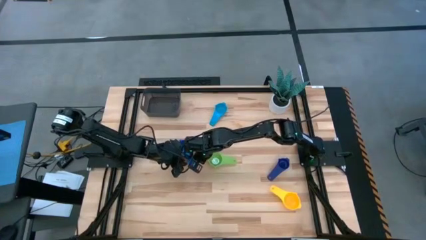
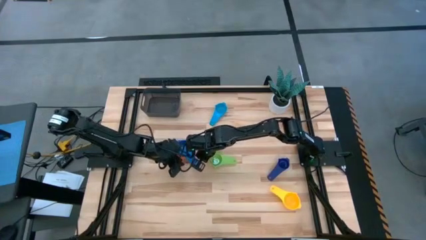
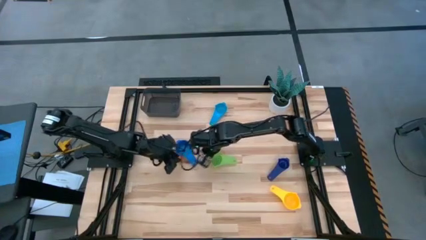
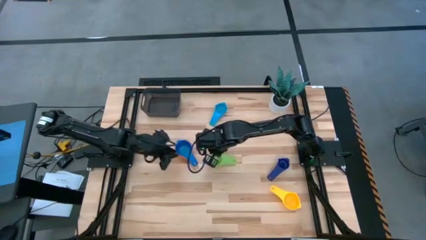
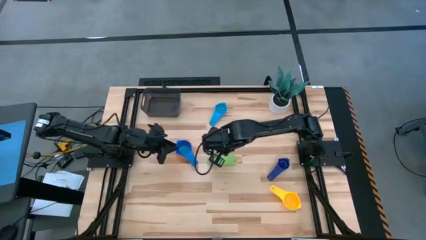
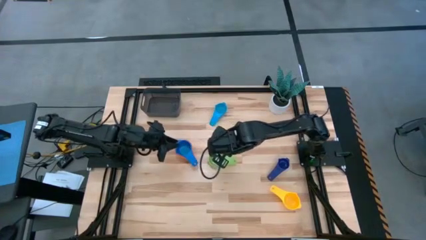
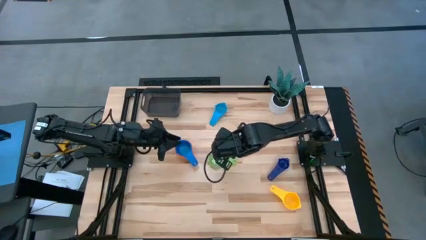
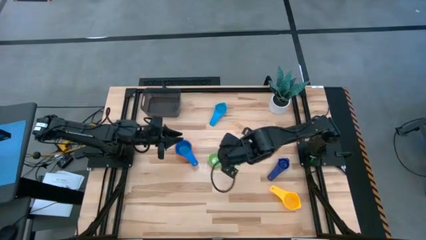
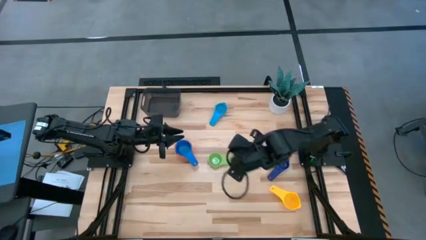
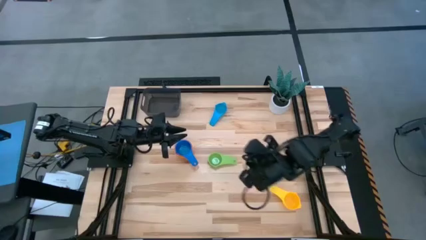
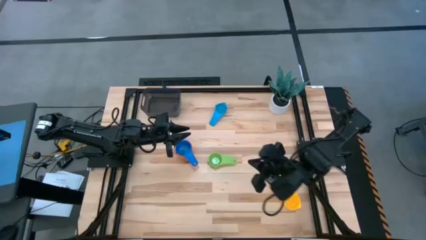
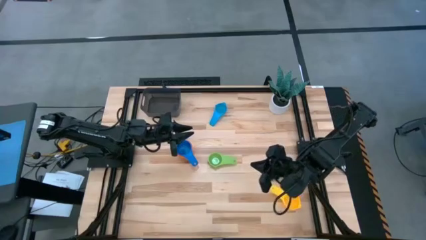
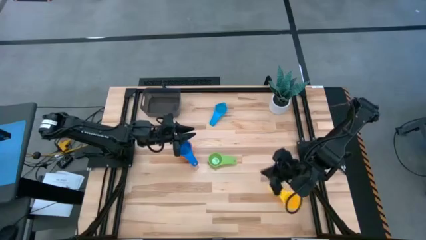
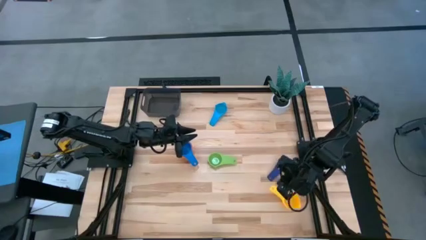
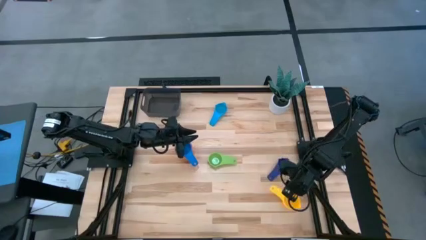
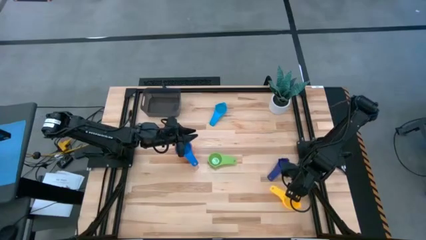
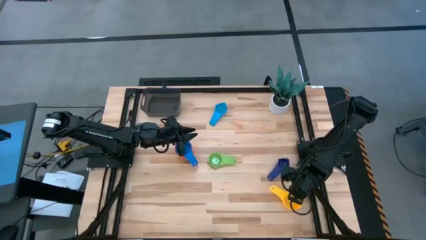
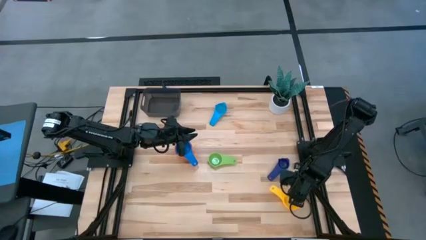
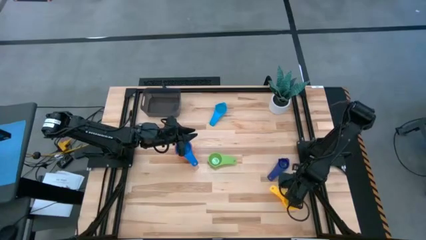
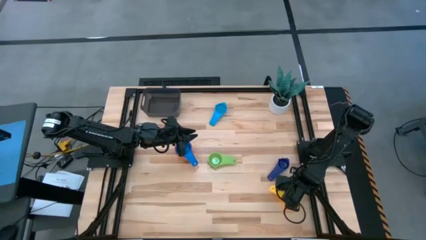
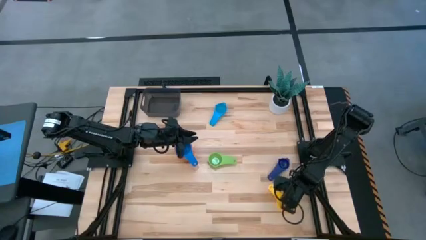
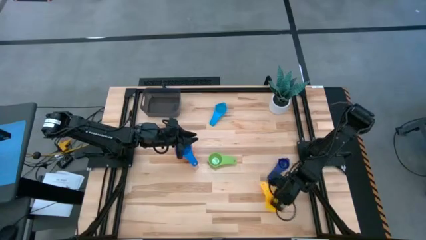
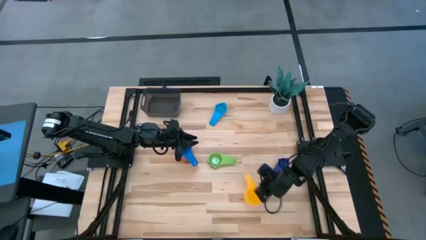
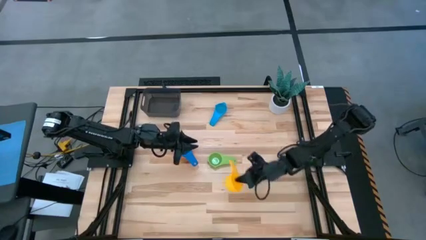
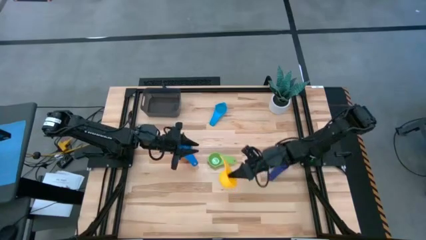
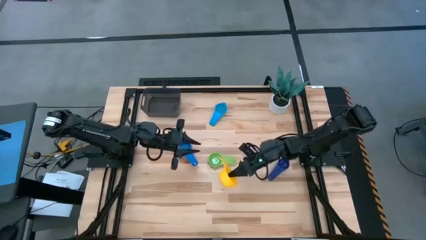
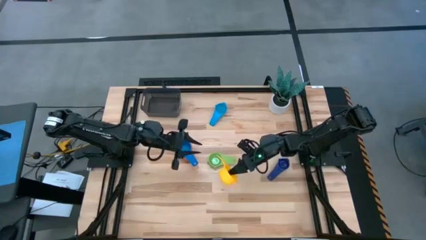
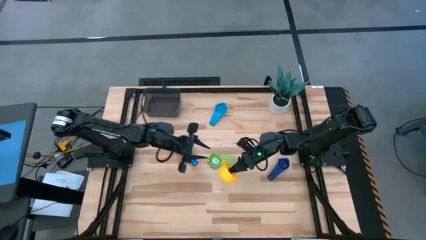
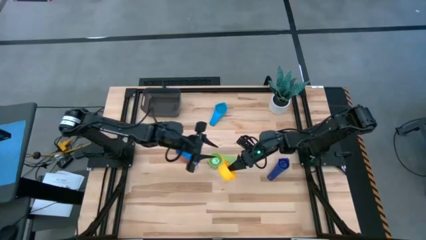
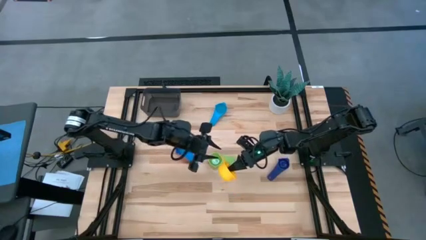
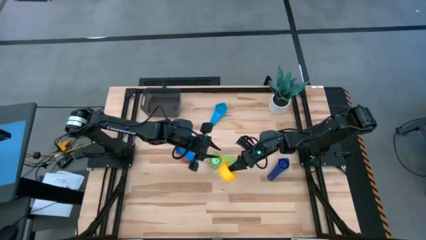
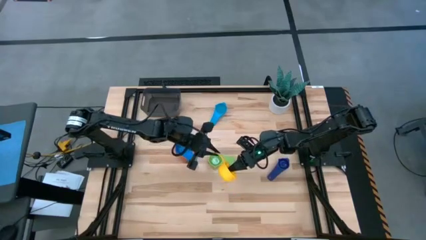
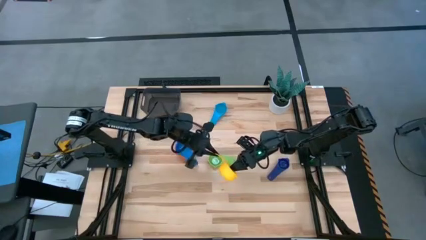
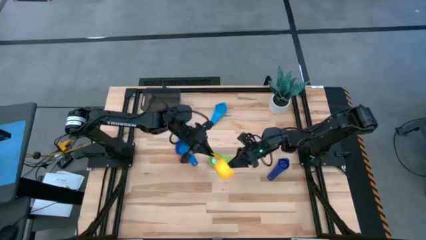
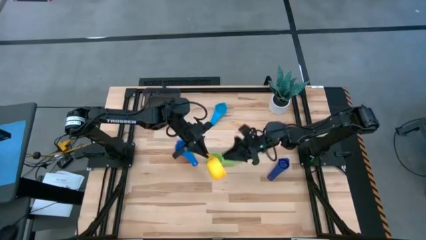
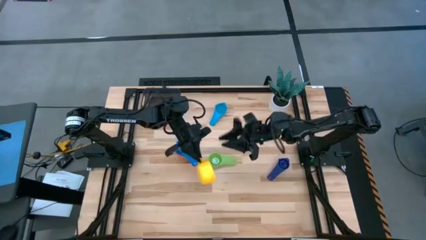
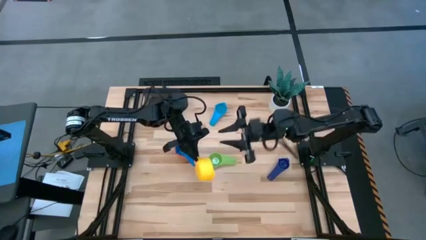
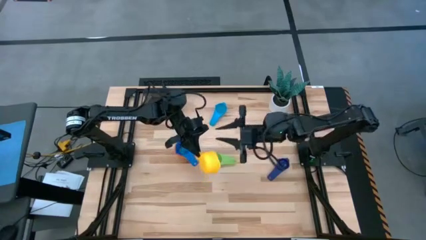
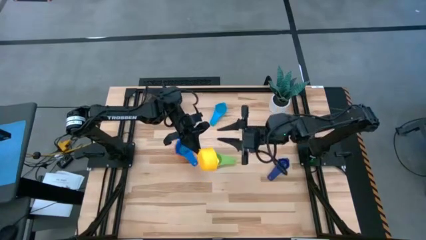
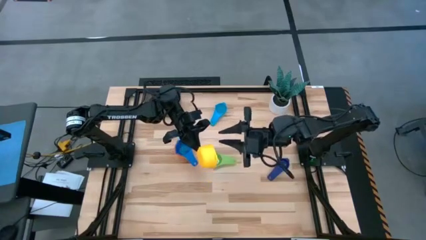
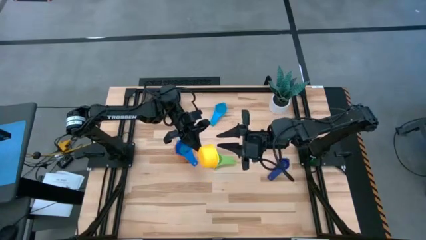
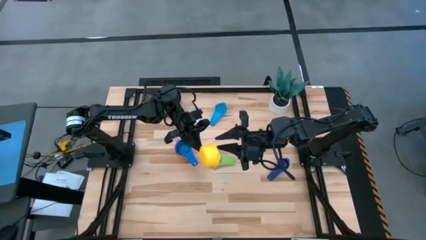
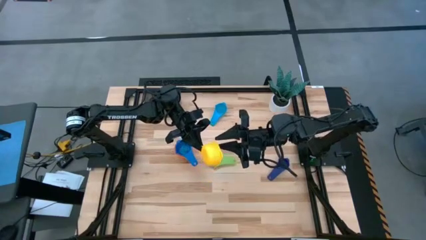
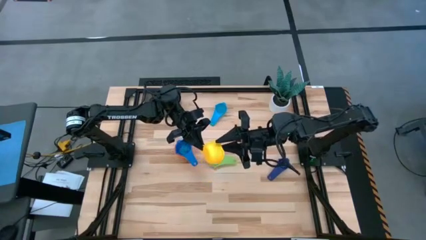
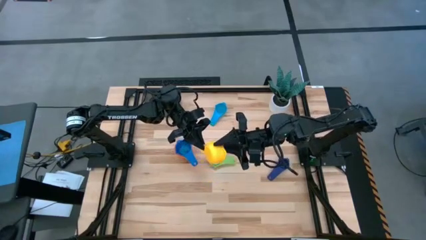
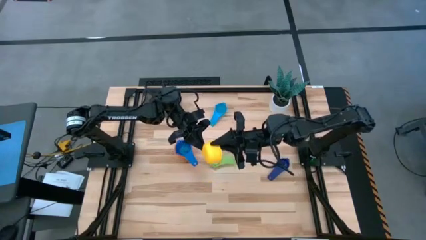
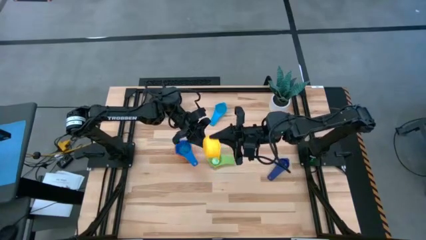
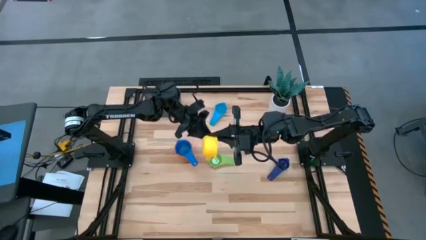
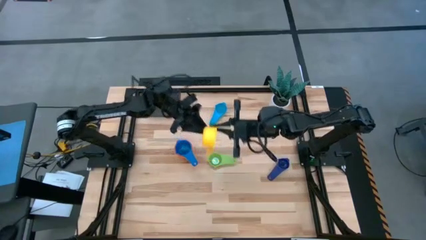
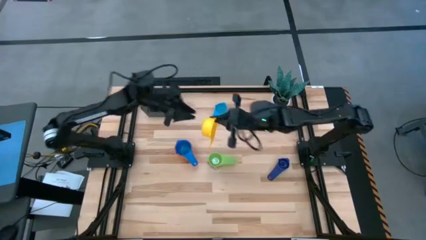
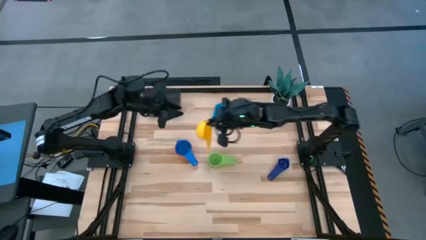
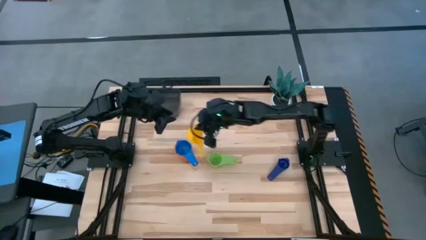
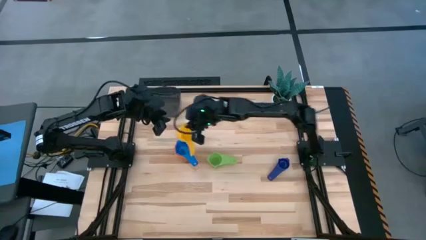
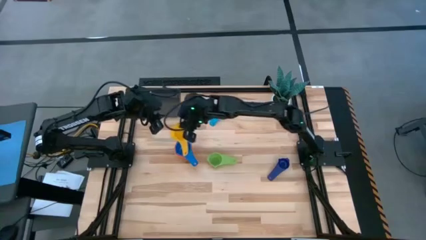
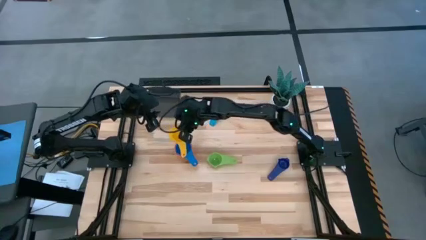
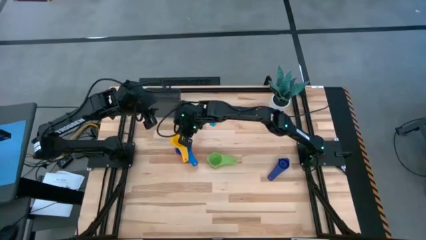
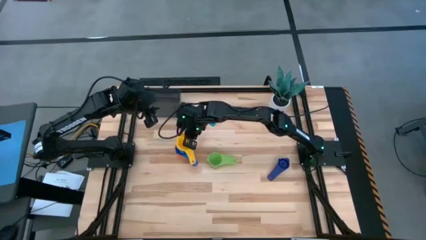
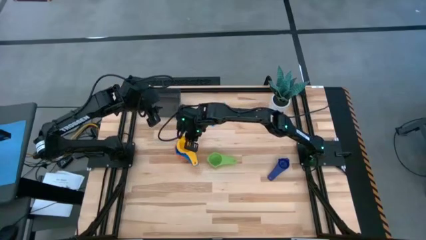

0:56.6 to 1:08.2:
Task: Nest measuring cups in basket
Stack the yellow measuring cup on top of the blue measuring cup
